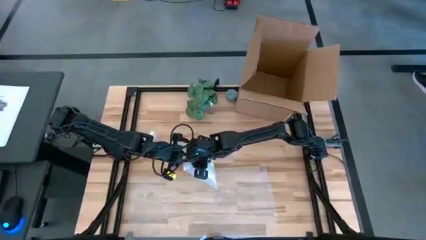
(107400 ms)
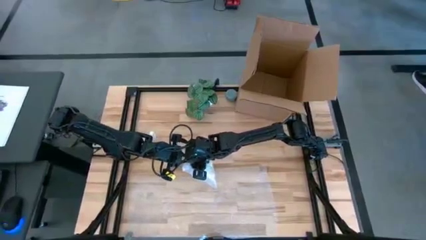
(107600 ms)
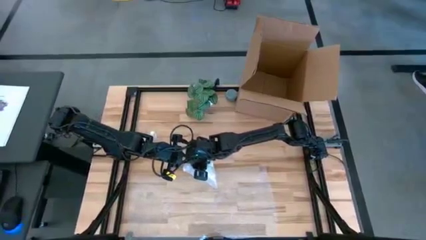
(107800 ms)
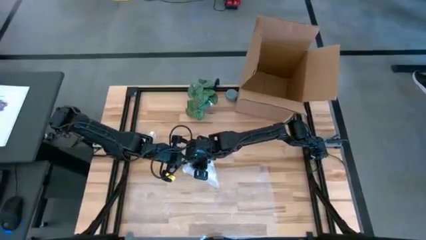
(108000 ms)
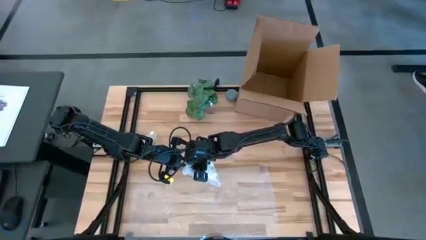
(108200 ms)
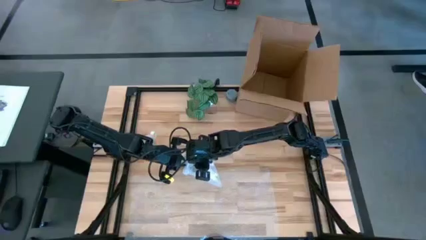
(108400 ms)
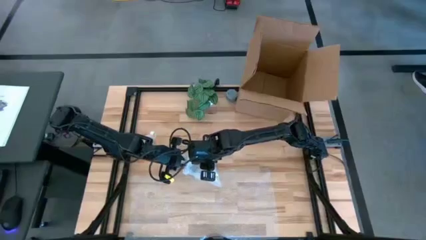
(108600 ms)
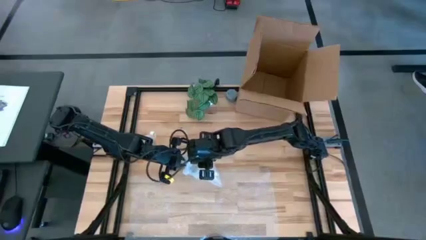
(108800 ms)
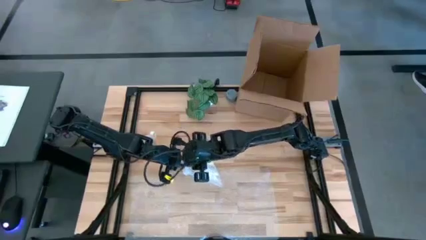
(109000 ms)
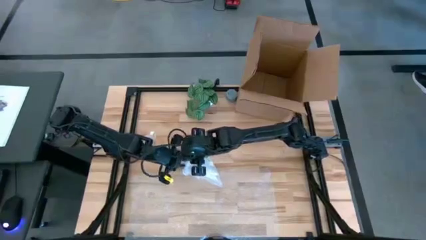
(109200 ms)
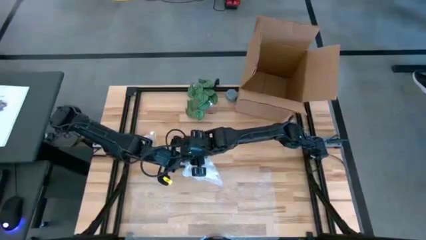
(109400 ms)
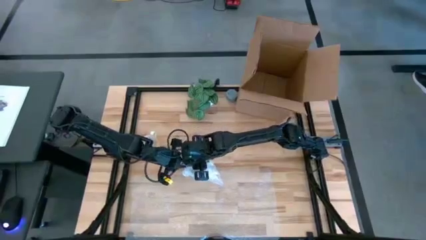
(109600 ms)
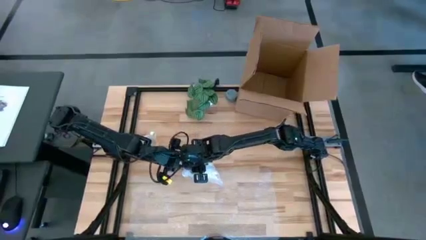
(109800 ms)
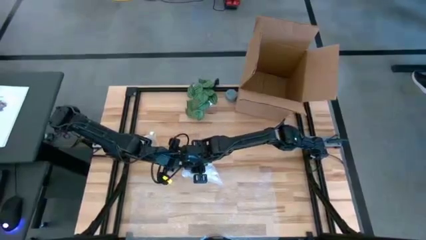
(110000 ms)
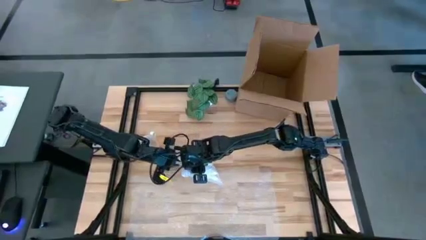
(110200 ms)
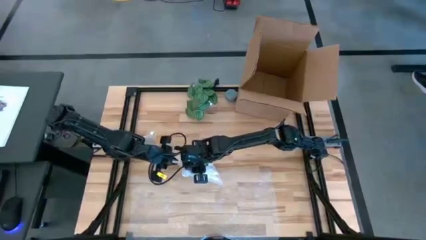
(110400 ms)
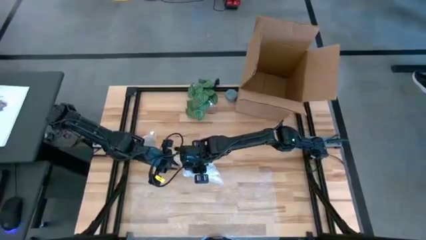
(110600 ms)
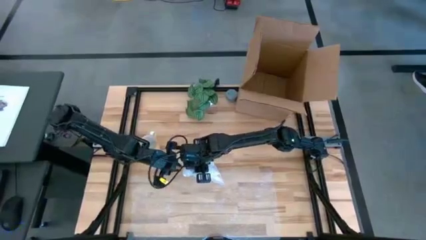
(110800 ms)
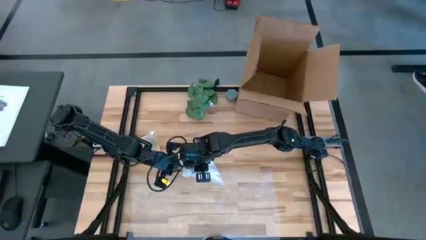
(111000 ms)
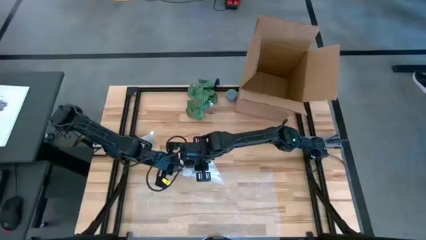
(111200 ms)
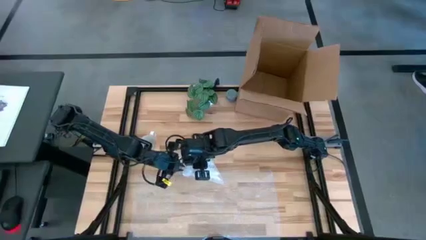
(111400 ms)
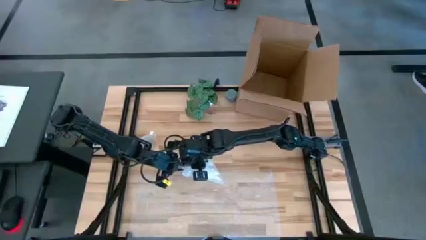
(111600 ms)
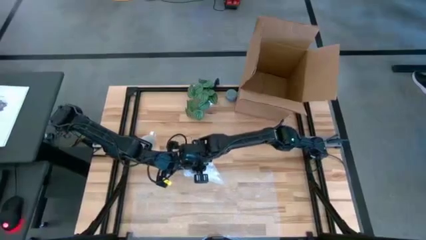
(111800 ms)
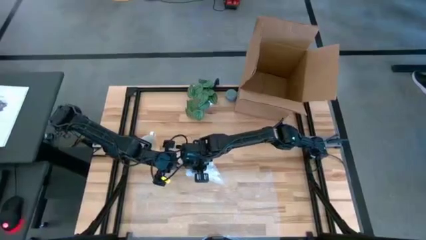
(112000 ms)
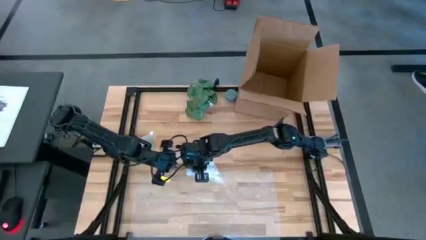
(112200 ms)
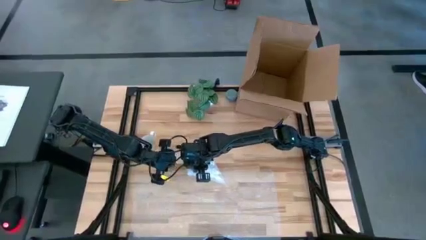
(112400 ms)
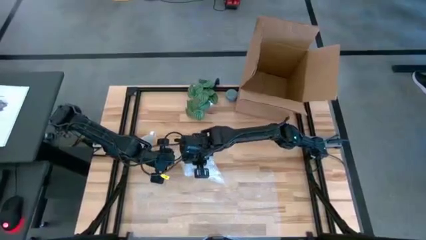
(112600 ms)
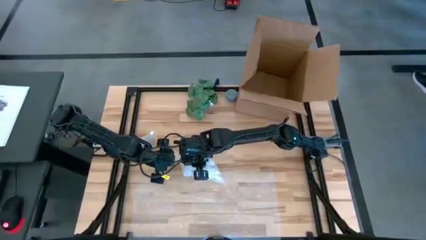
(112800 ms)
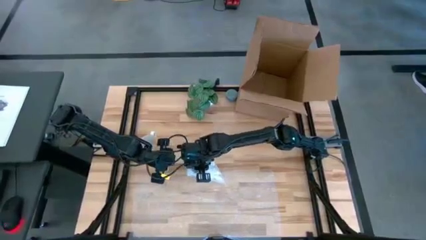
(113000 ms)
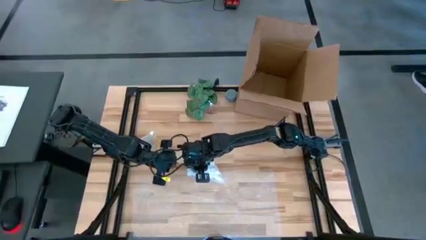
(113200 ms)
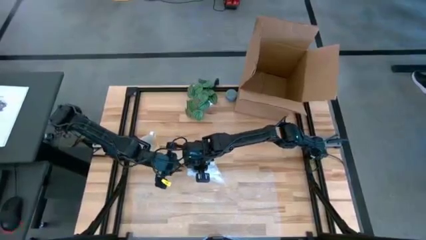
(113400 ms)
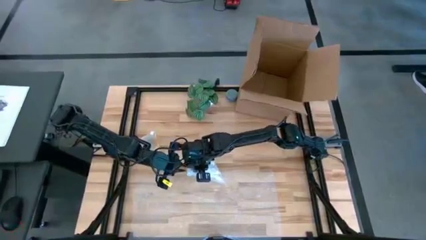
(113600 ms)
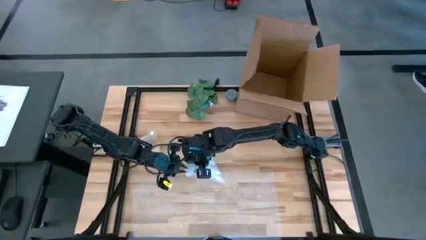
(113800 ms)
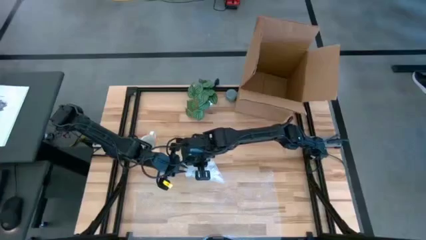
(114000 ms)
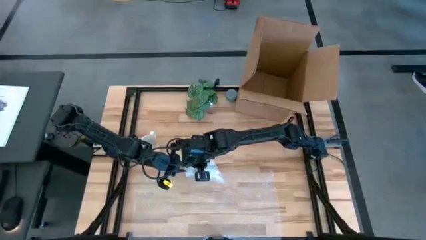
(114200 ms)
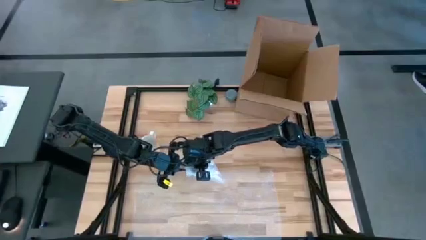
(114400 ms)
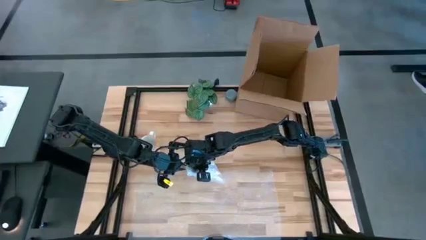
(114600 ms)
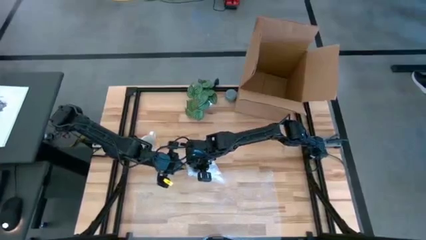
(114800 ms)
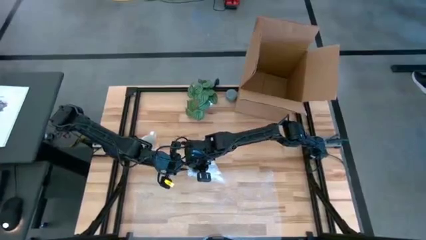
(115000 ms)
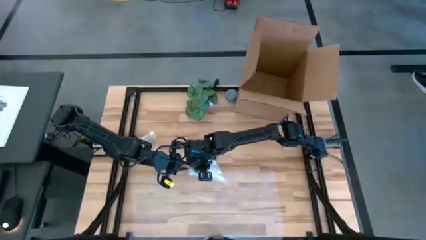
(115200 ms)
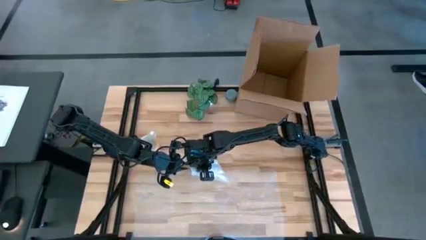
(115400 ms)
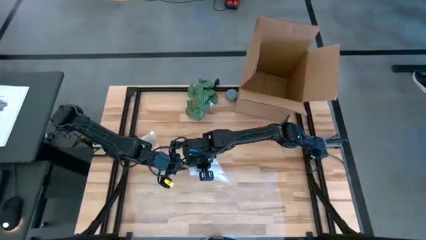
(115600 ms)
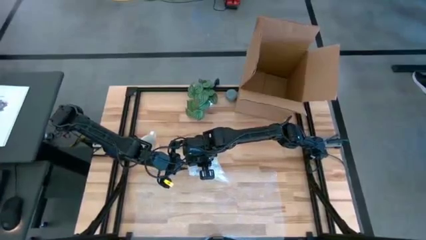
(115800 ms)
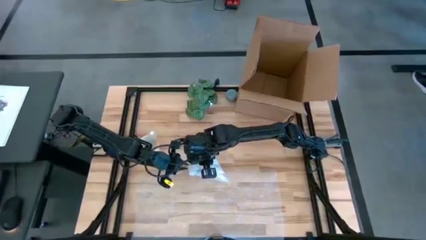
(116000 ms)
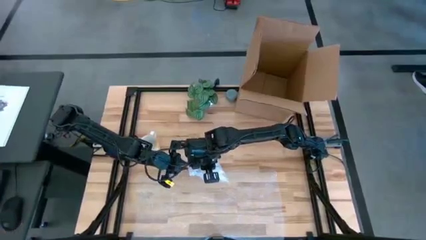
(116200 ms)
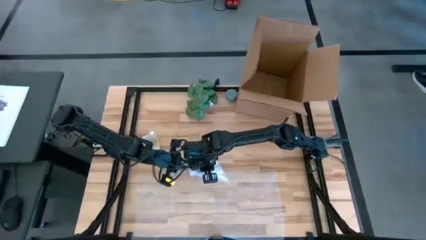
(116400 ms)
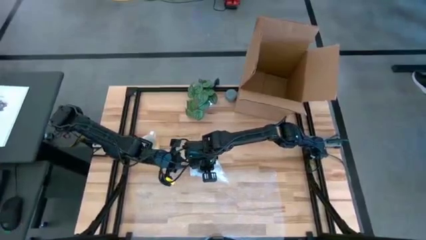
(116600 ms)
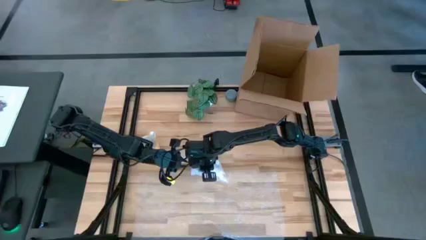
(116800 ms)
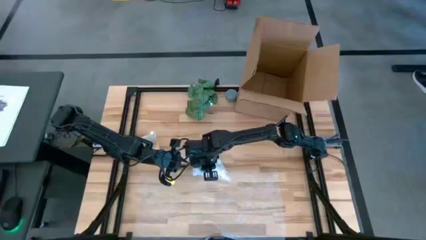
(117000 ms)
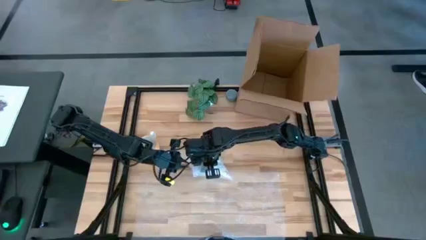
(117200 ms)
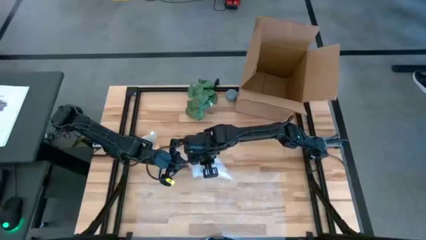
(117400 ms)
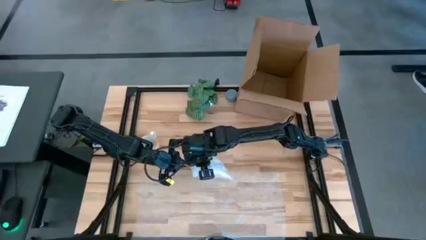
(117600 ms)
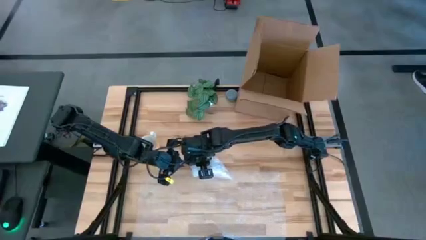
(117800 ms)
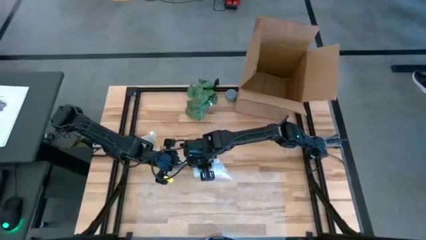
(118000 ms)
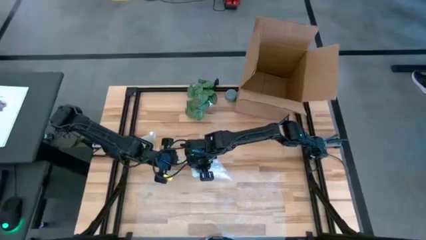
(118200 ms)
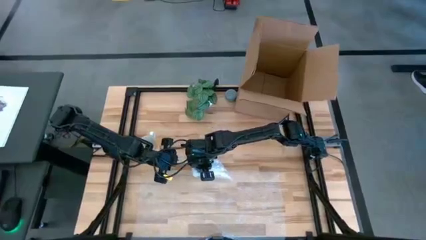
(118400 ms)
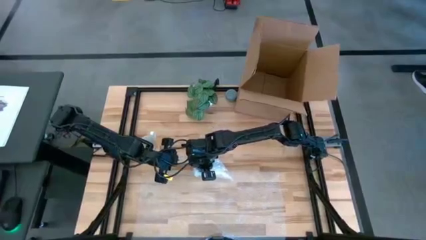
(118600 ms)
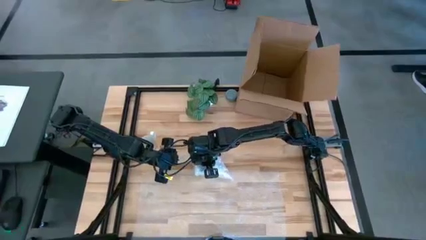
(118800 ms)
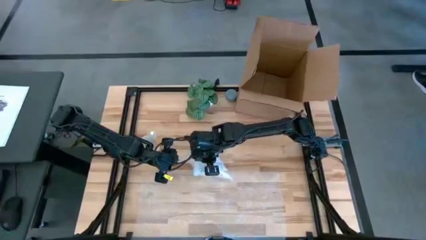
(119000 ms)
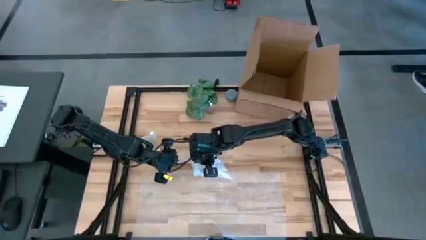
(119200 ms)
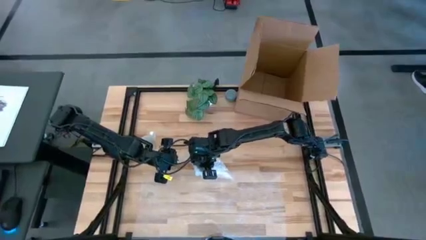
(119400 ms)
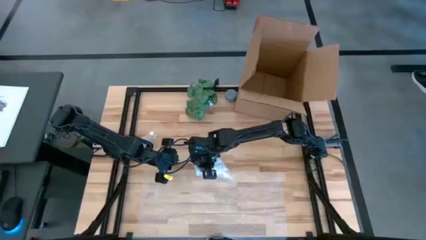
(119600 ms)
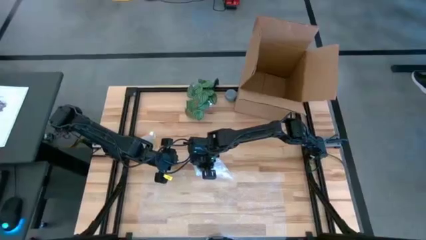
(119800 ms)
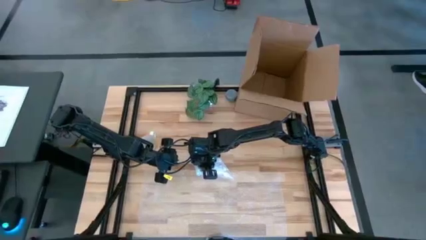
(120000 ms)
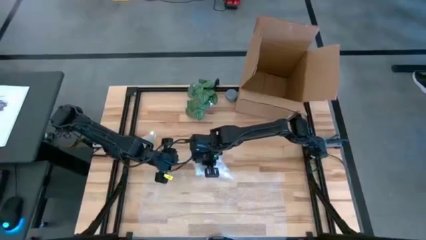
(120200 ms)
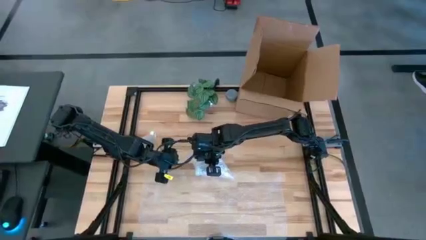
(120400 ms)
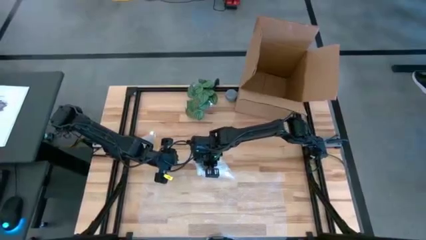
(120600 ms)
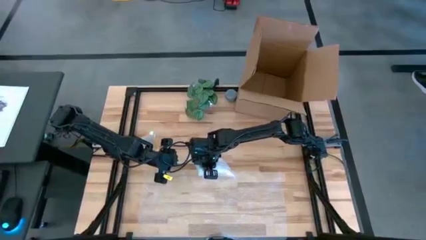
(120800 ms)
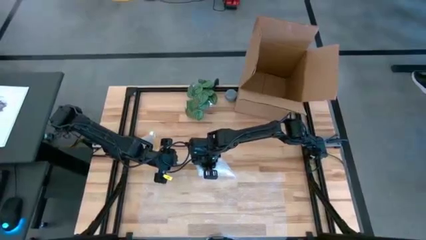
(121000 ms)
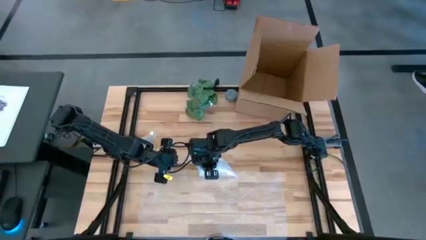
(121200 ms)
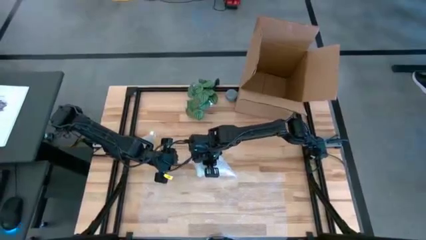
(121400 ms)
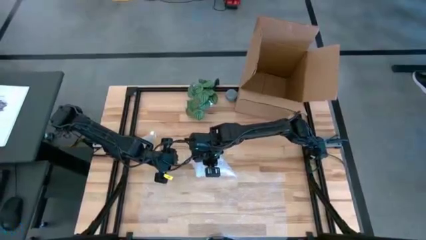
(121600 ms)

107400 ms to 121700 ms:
Task: wrap mug
Wrap the blue cup with the bubble wrap

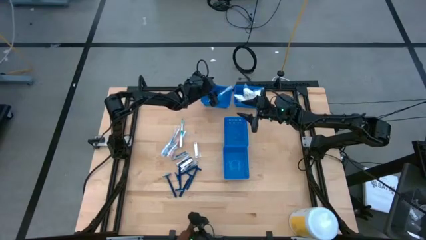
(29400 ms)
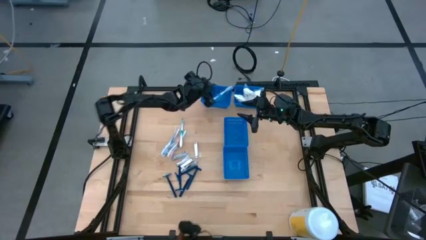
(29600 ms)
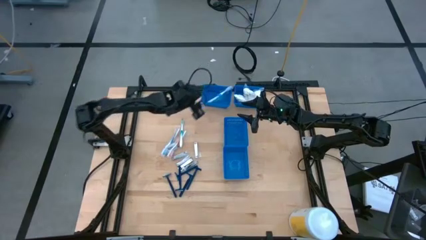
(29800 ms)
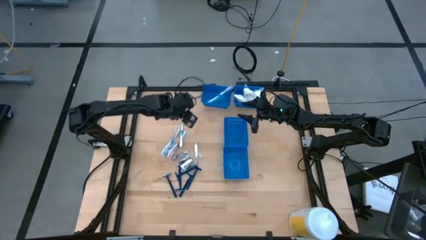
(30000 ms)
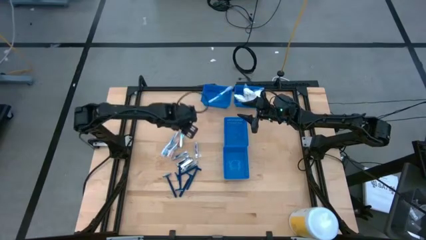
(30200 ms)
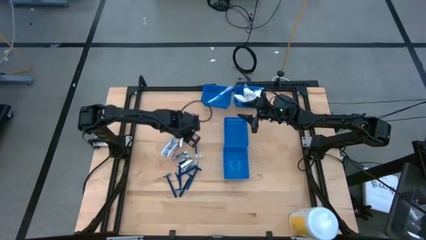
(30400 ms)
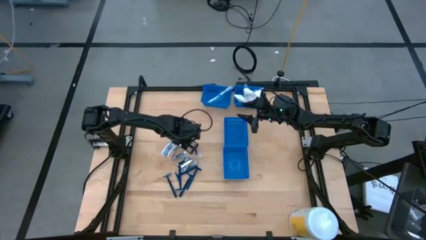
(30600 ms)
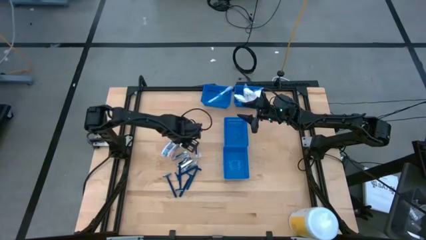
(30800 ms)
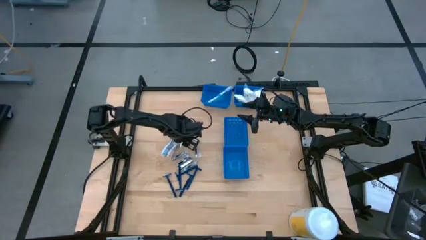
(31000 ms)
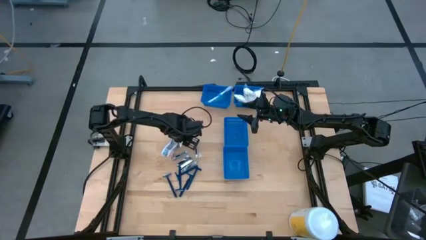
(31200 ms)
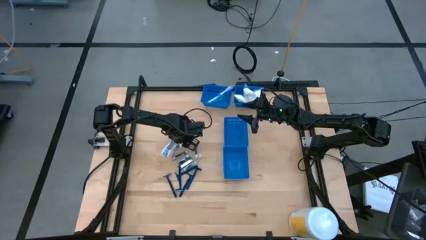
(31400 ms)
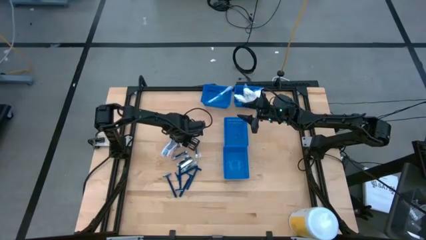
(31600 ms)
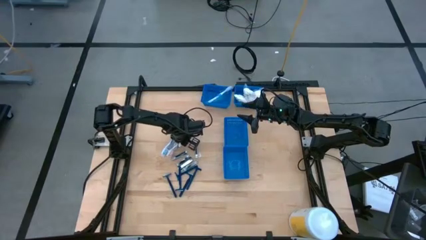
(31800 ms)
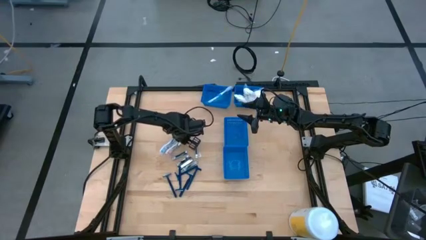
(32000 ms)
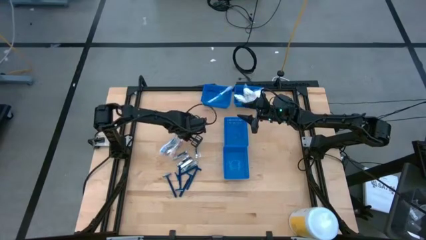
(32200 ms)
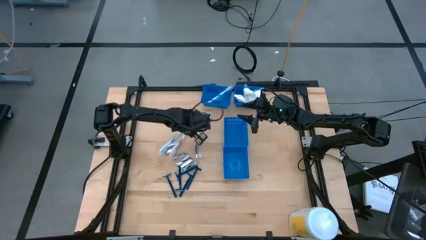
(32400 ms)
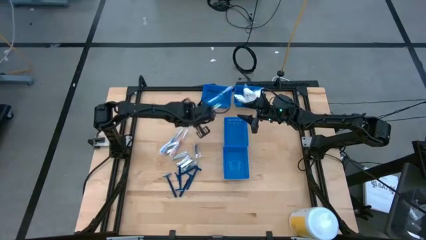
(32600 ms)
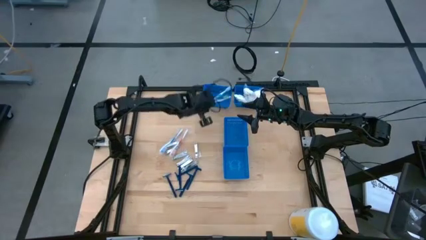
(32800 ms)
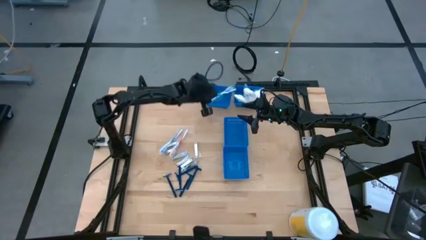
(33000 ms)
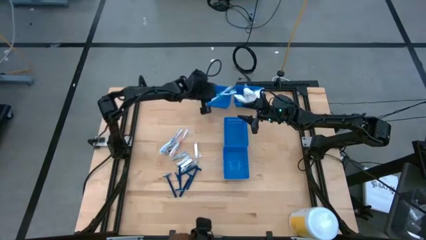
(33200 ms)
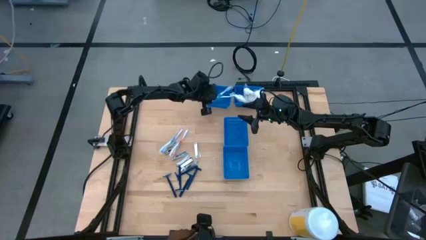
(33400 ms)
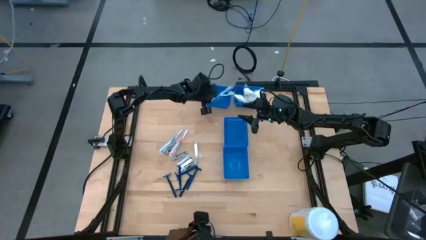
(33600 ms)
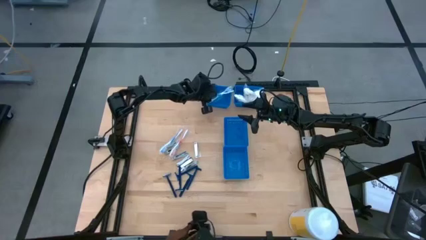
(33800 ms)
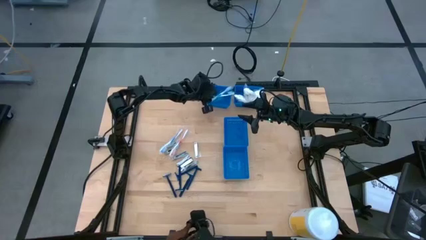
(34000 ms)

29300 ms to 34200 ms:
Task: Pick & Place Travel size toiletries
Put the green toothbrush into the top left blue bin
